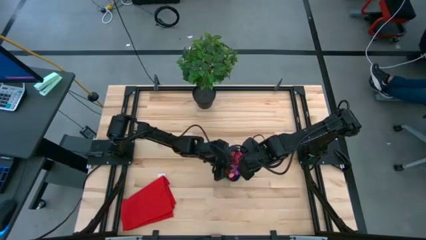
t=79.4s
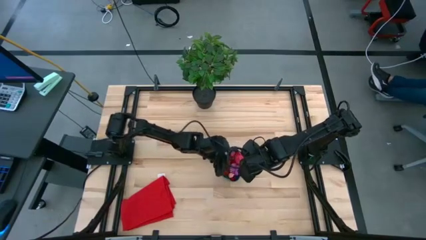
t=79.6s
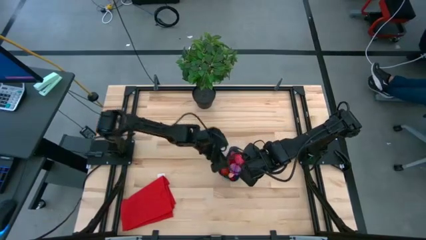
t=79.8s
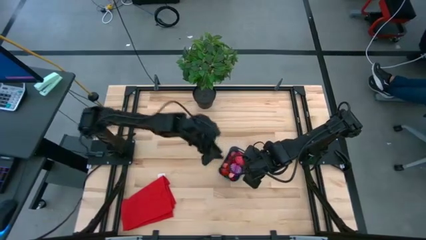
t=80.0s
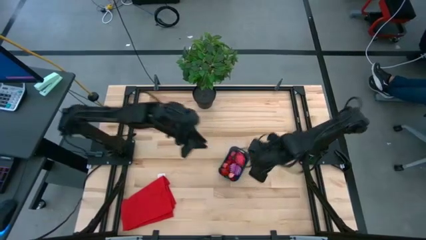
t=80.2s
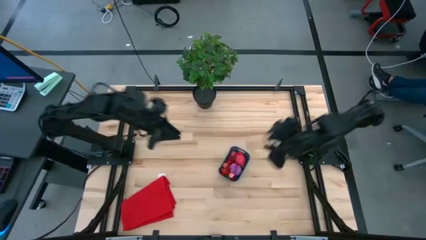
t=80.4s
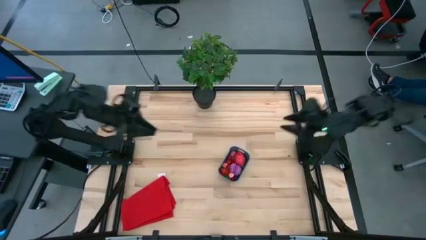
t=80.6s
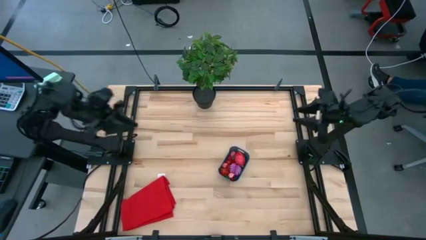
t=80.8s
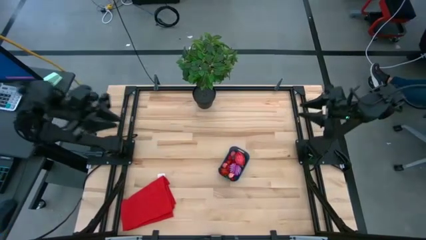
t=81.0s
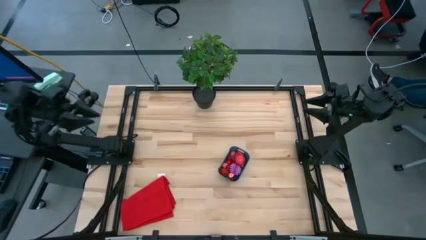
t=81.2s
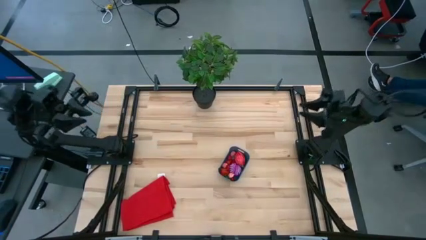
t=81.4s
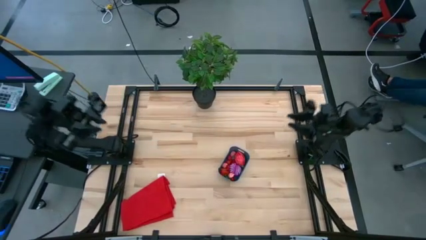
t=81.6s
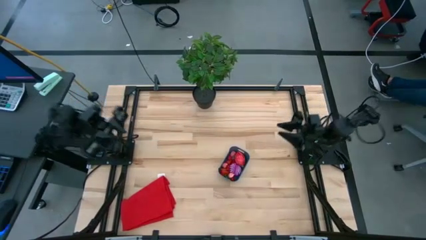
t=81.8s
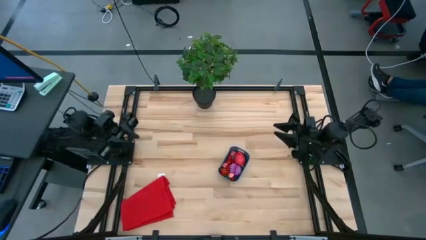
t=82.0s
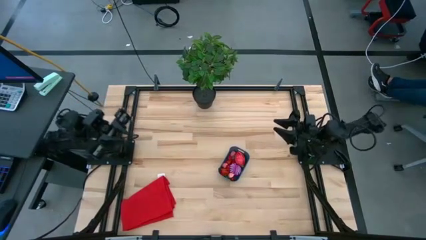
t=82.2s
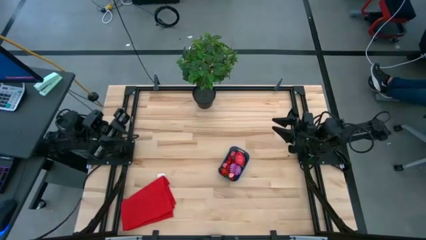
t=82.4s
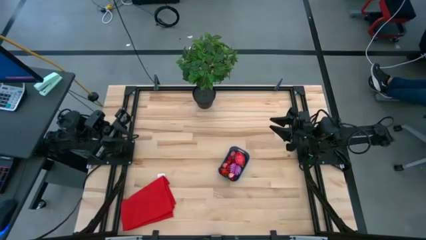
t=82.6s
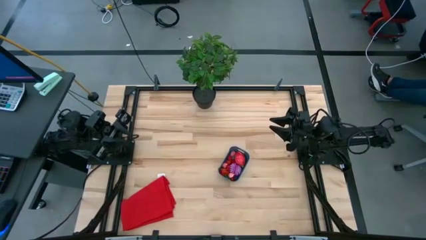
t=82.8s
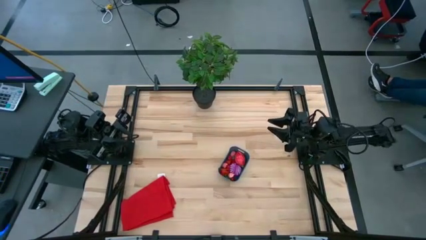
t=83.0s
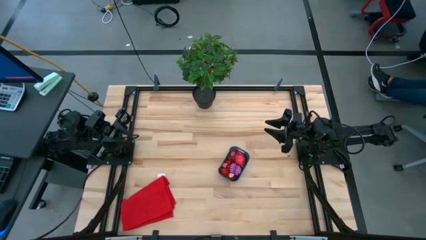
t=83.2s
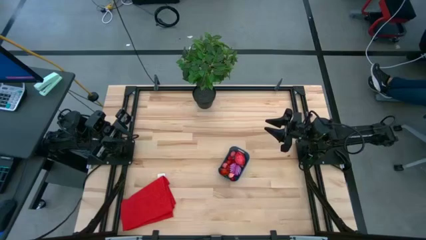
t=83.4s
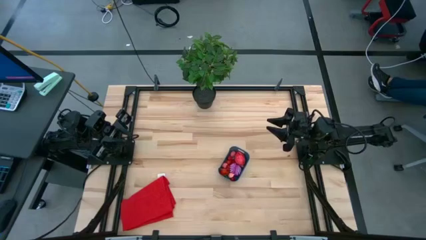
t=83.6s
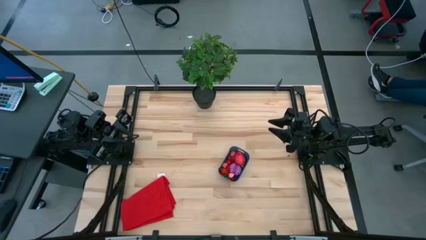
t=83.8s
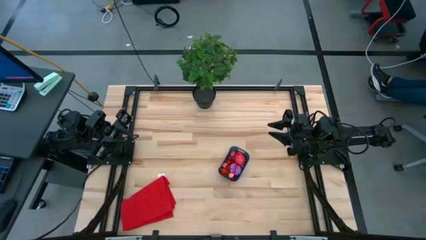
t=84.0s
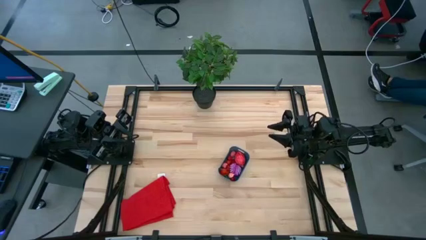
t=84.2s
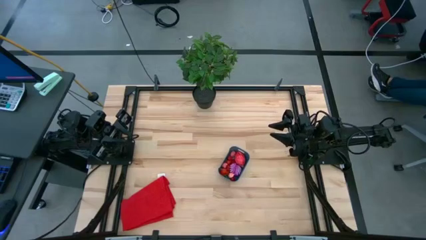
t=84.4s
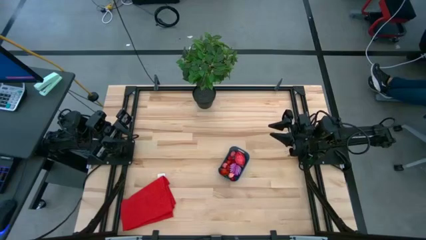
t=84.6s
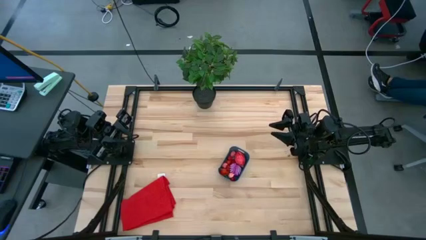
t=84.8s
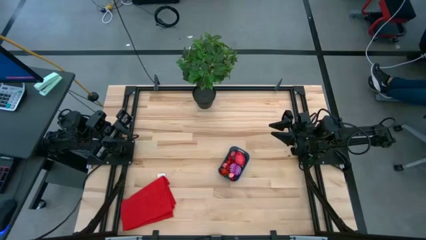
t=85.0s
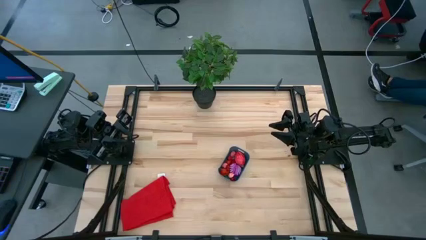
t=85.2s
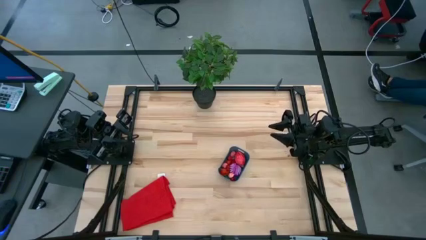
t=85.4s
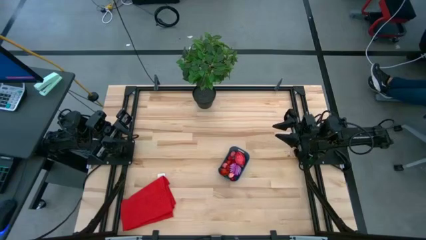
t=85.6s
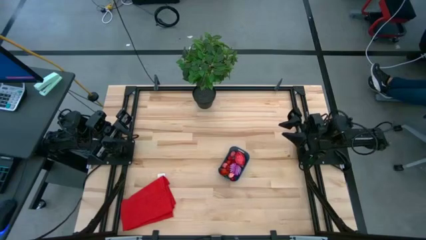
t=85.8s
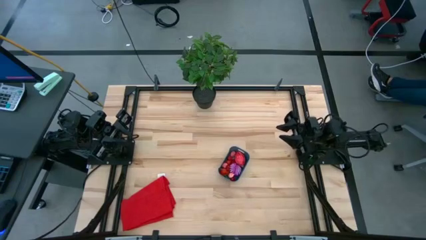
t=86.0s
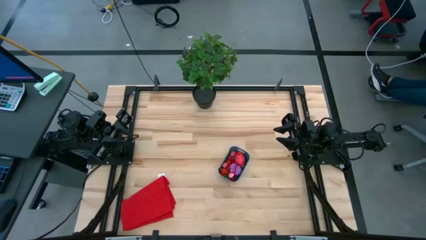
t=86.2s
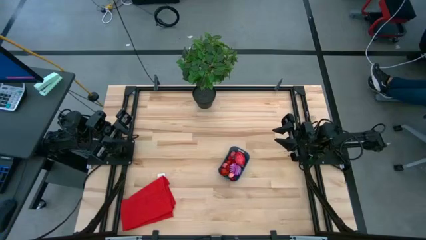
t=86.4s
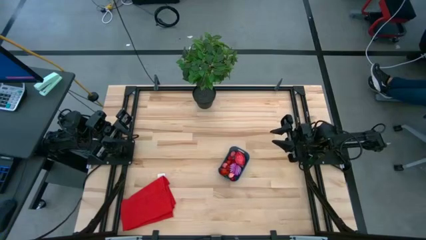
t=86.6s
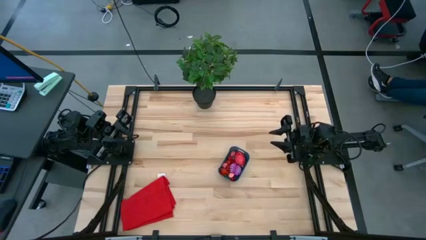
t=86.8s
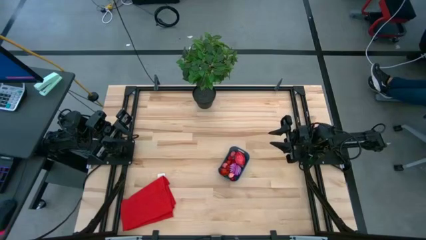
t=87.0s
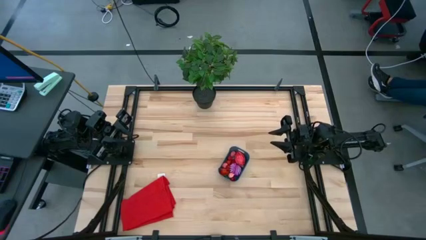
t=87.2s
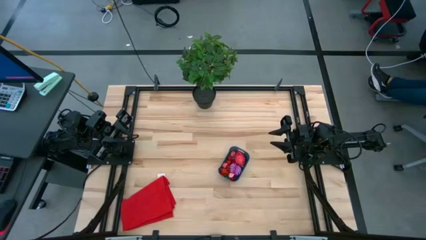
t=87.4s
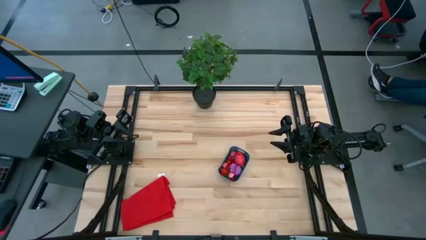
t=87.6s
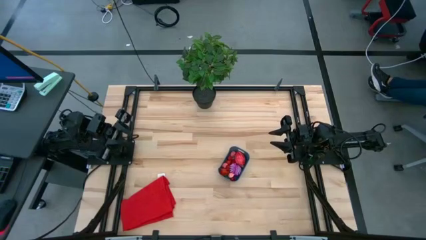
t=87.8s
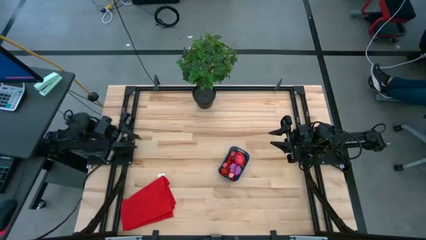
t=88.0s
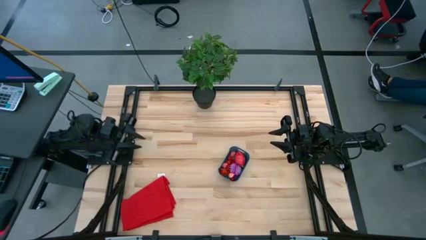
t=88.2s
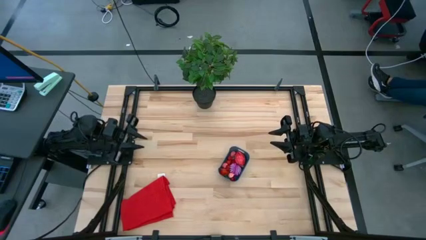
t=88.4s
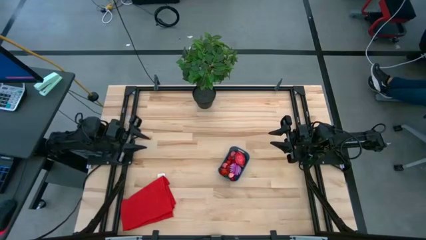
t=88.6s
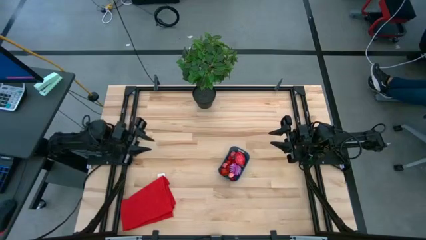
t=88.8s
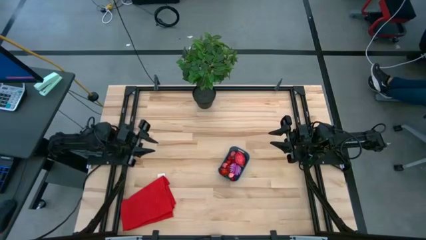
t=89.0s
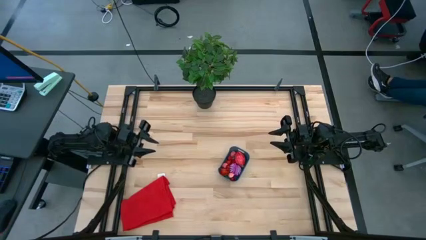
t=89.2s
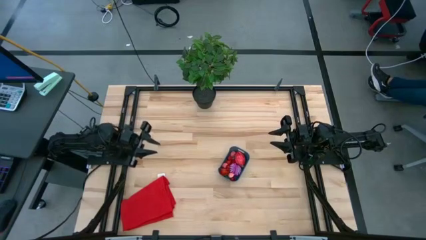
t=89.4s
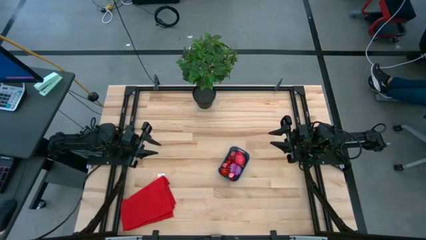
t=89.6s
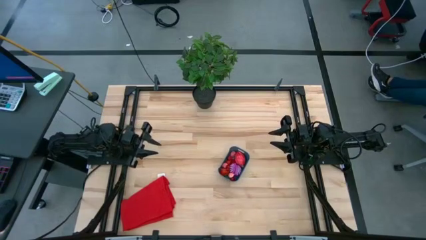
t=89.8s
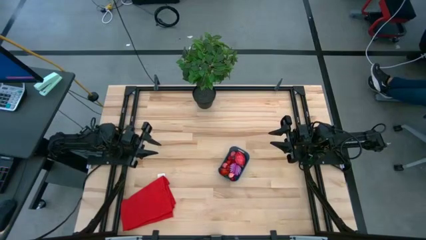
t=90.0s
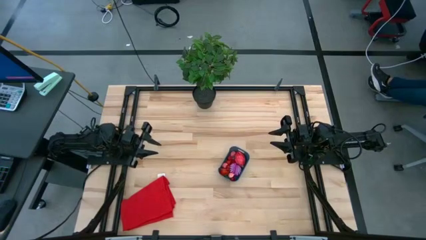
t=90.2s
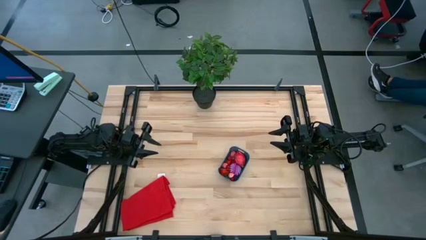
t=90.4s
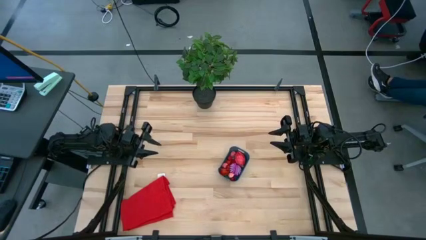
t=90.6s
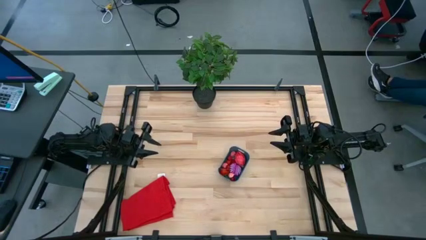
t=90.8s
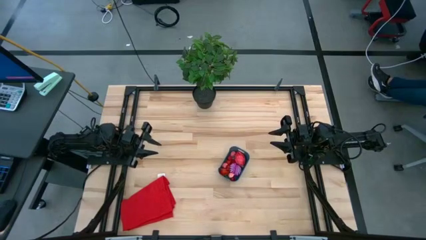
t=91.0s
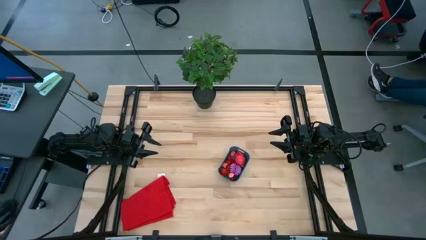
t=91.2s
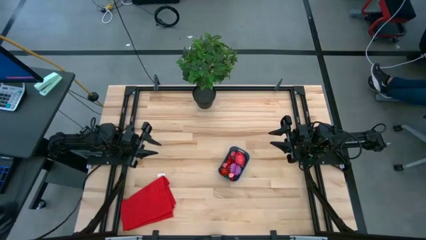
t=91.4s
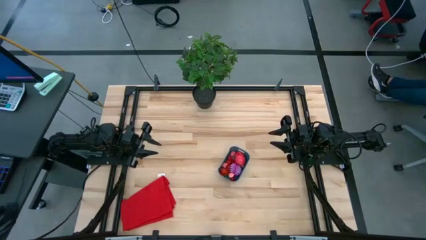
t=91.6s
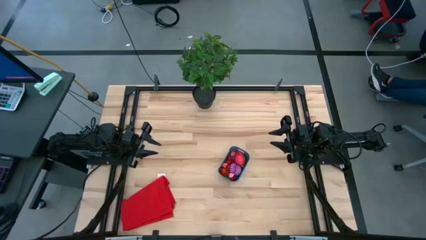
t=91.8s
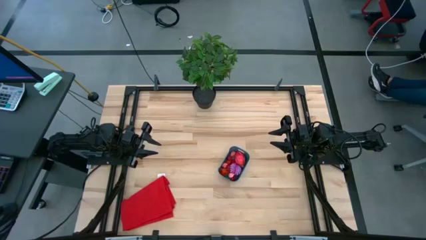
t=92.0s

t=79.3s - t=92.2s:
Task: Pick and placing Produce into tupperware
Return to Home Position

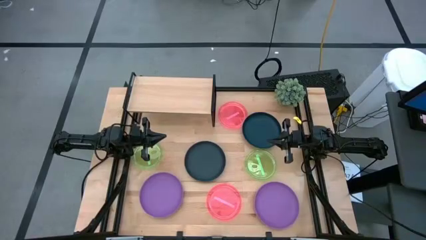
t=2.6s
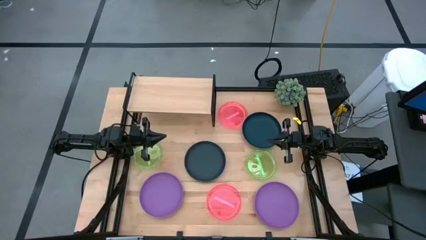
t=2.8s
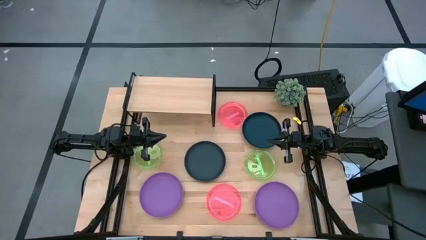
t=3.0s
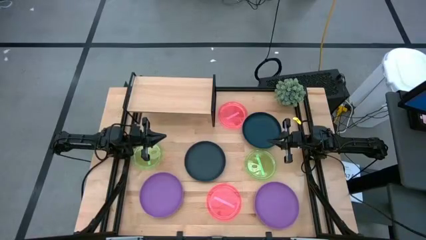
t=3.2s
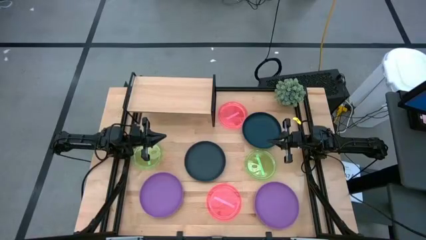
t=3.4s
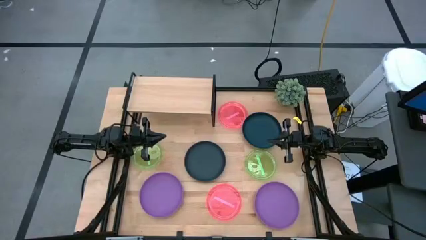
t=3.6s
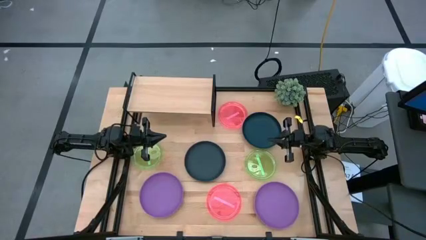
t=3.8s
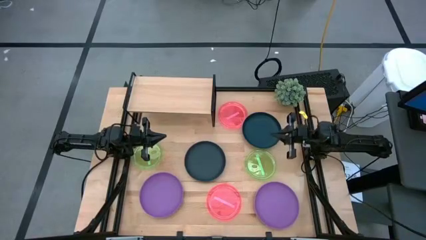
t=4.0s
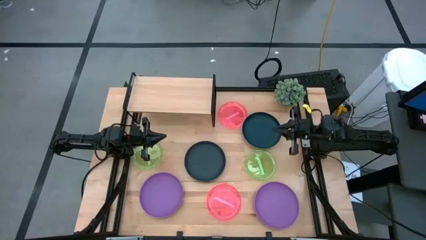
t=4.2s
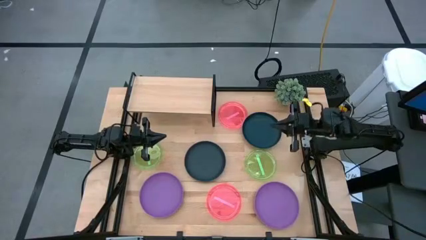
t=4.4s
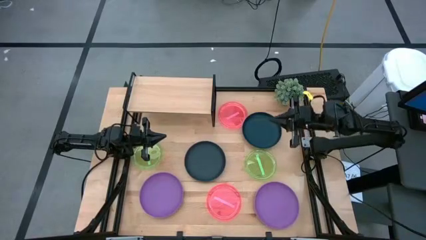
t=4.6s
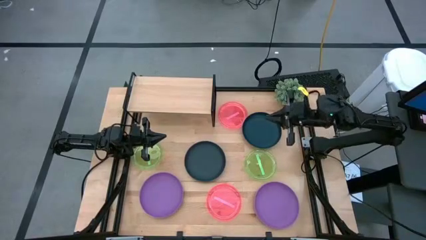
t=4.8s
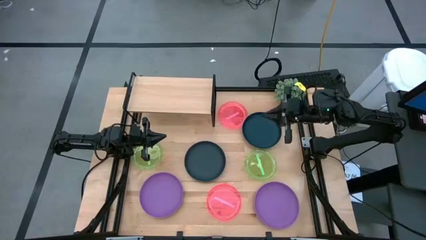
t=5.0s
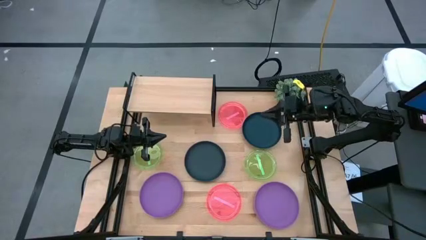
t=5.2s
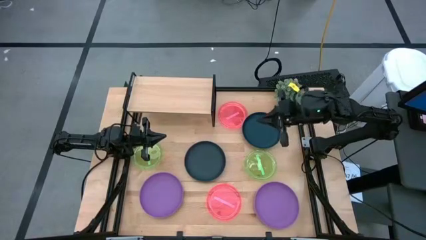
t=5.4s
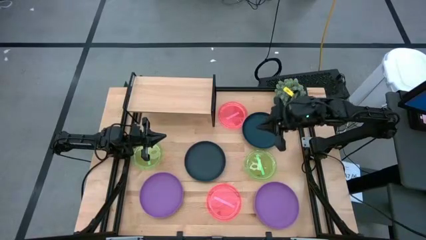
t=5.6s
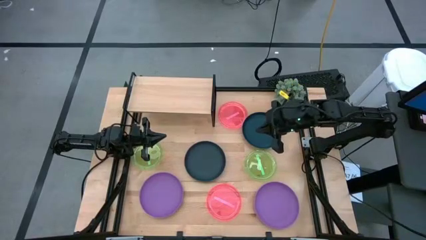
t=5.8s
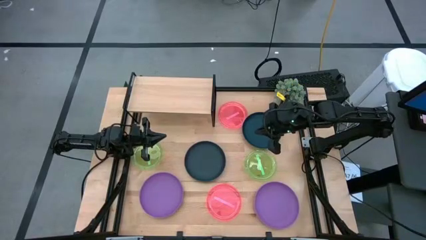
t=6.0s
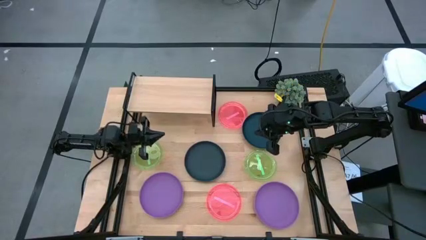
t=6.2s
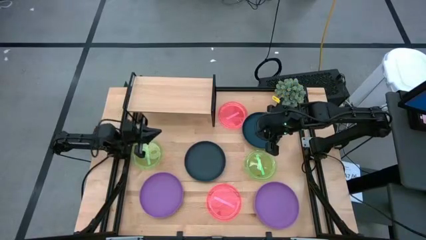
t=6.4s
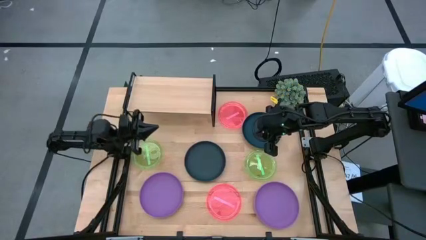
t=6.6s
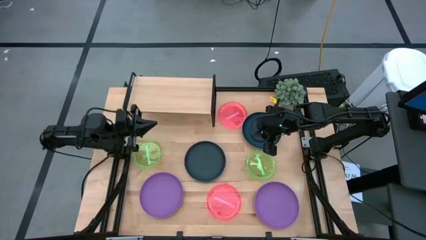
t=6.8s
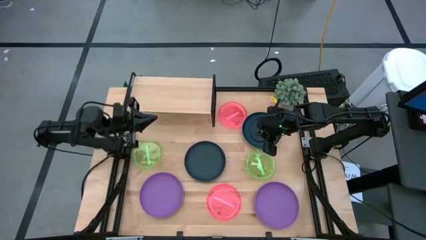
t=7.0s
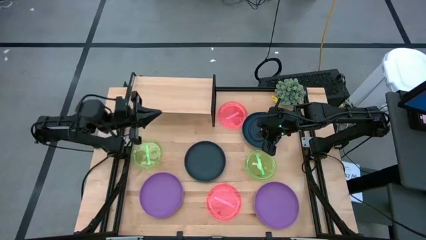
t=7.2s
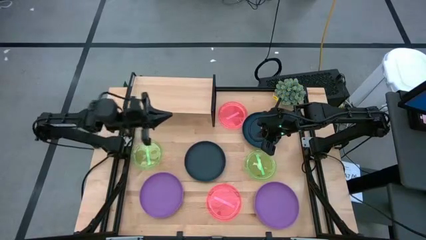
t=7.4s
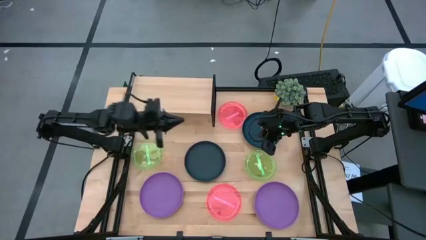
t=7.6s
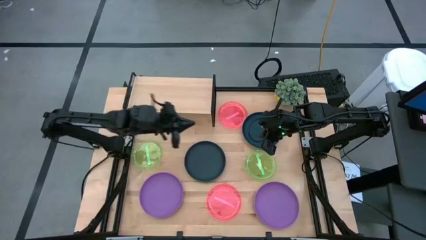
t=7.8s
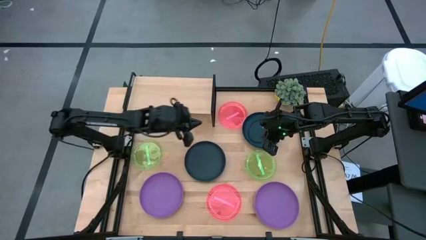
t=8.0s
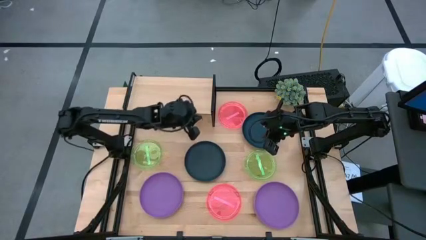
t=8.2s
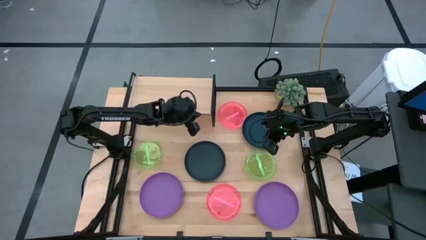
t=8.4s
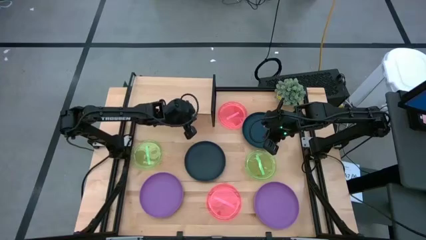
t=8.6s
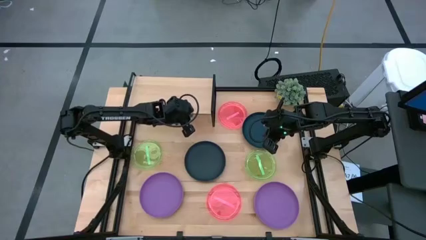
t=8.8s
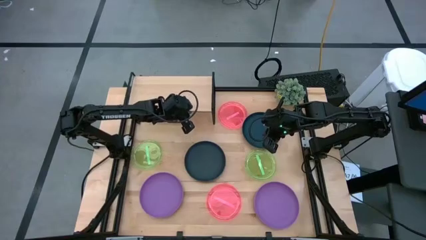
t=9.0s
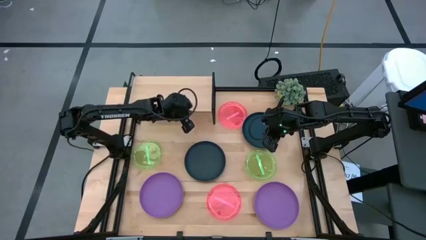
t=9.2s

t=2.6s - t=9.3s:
Task: Place and stack plates onto a shelf
Adjust the shelf on the table
